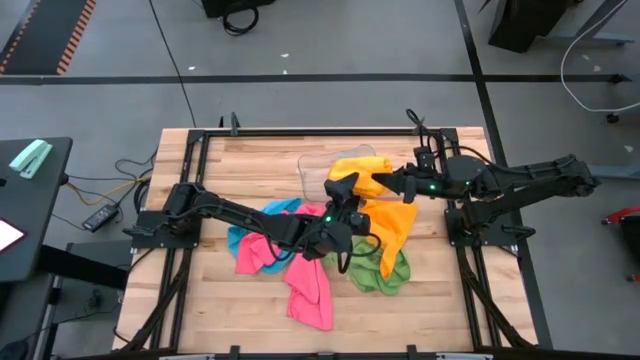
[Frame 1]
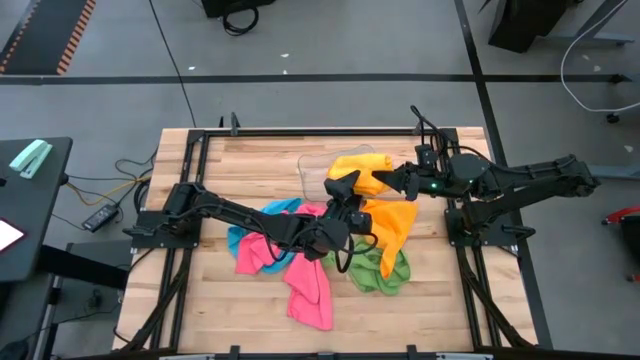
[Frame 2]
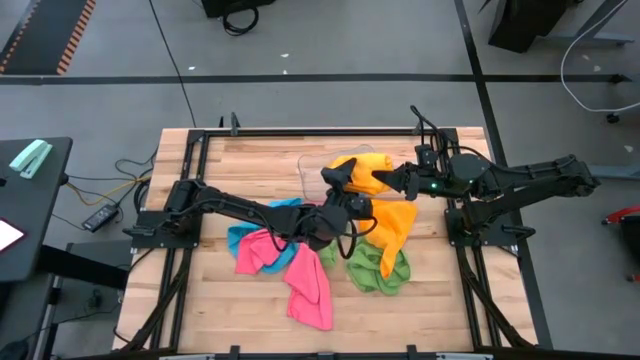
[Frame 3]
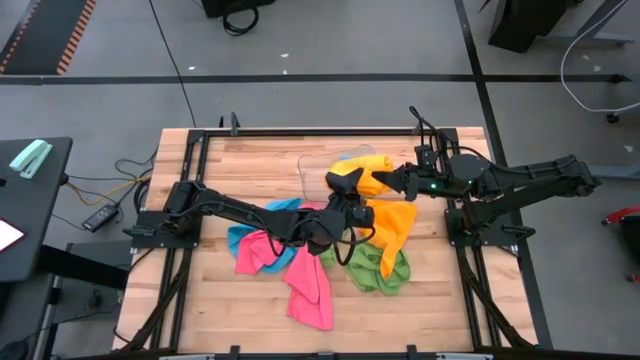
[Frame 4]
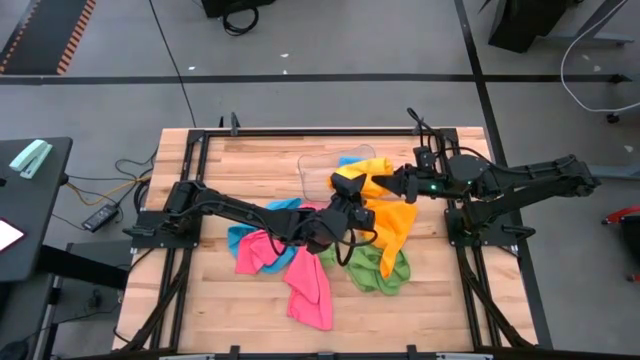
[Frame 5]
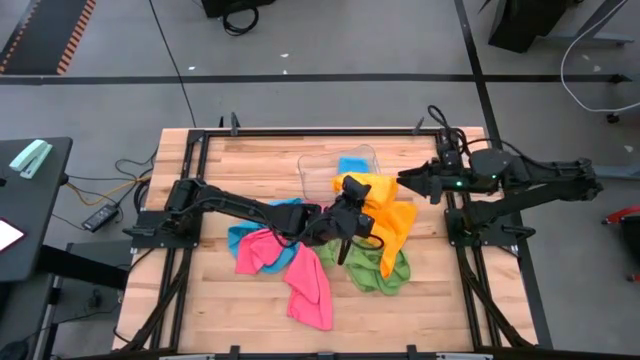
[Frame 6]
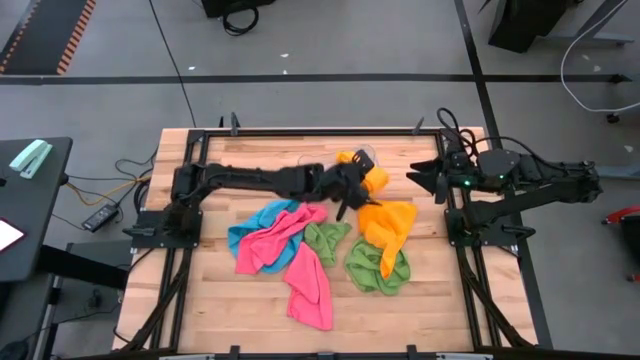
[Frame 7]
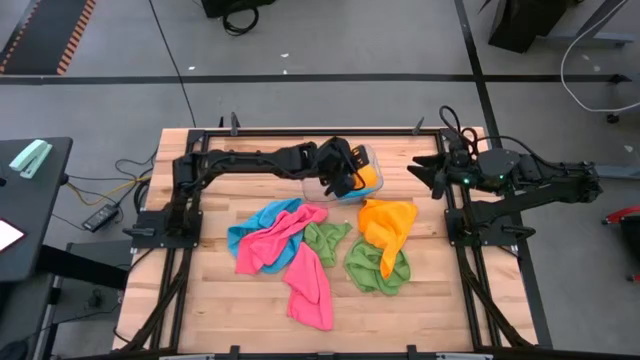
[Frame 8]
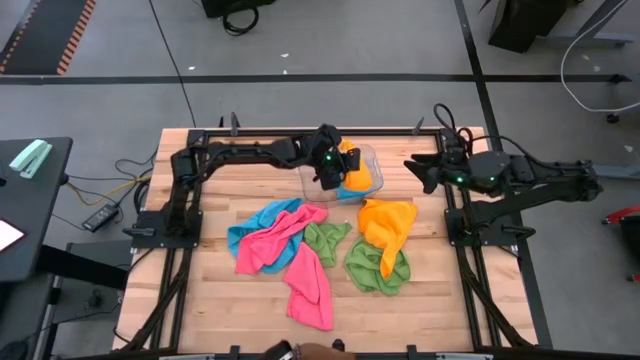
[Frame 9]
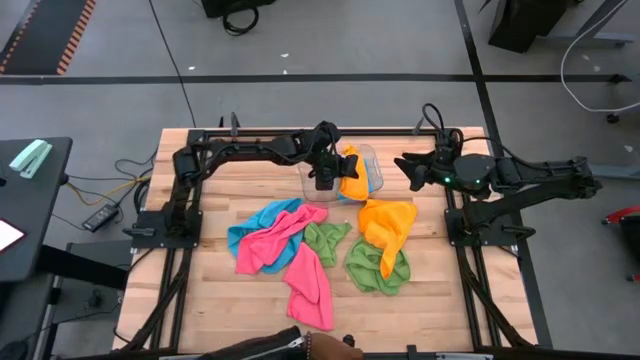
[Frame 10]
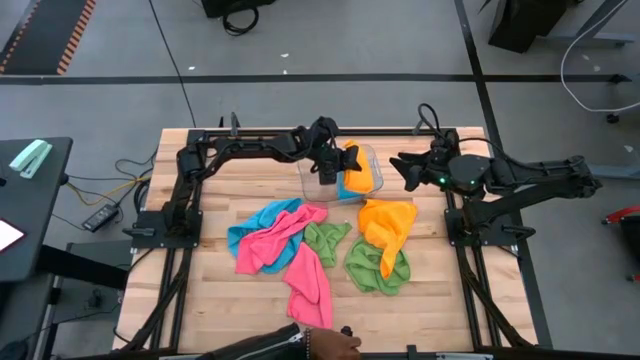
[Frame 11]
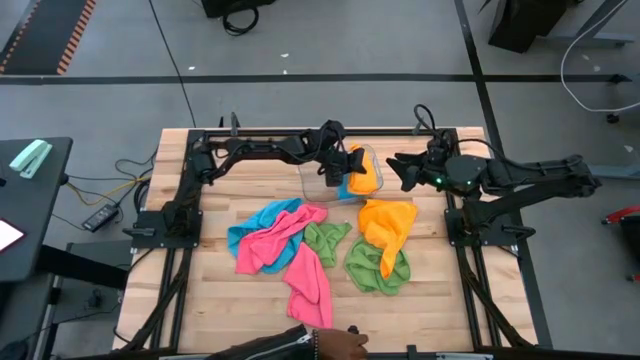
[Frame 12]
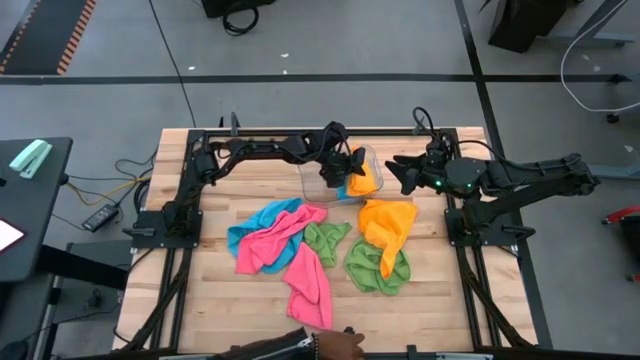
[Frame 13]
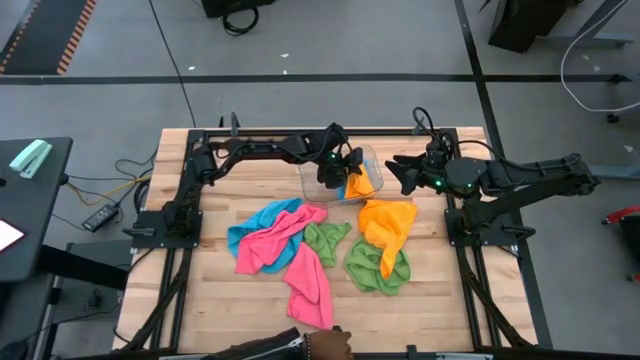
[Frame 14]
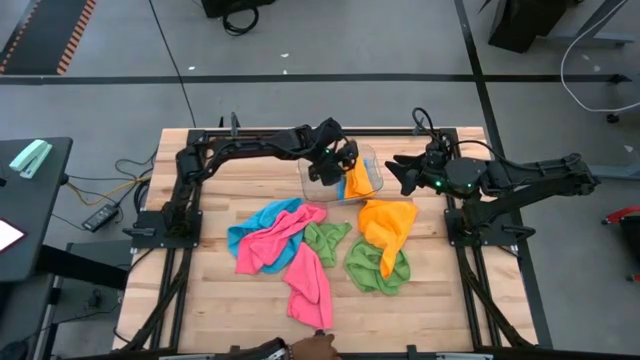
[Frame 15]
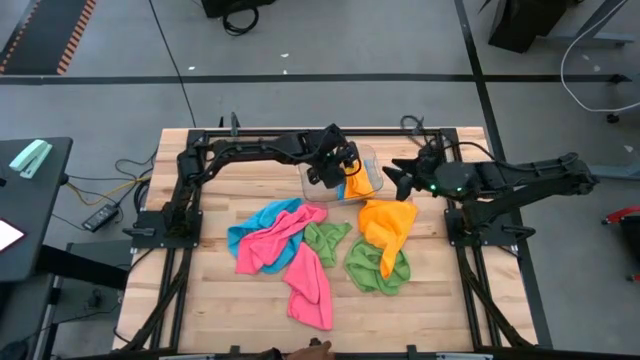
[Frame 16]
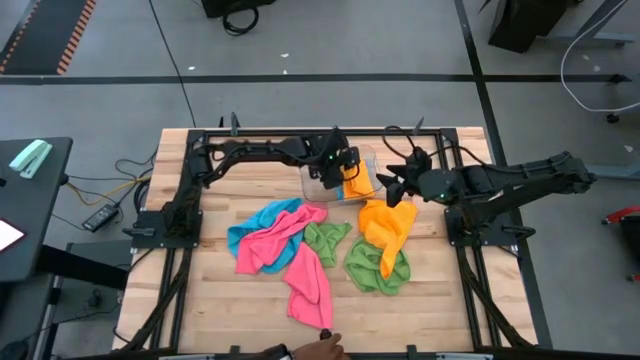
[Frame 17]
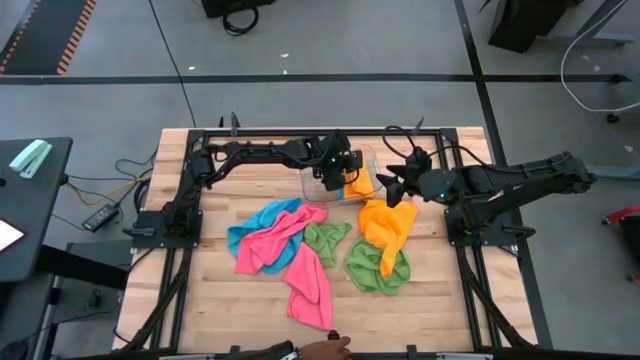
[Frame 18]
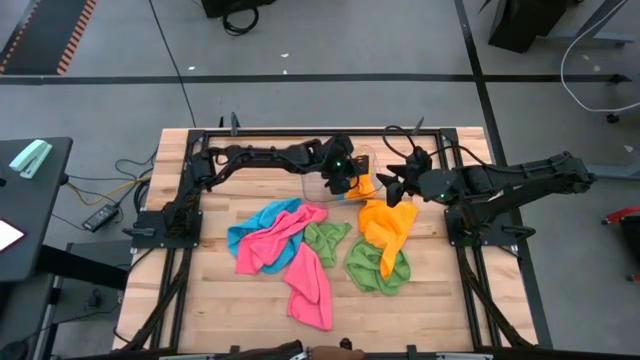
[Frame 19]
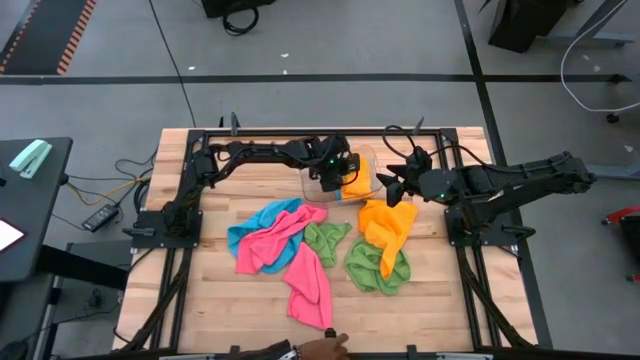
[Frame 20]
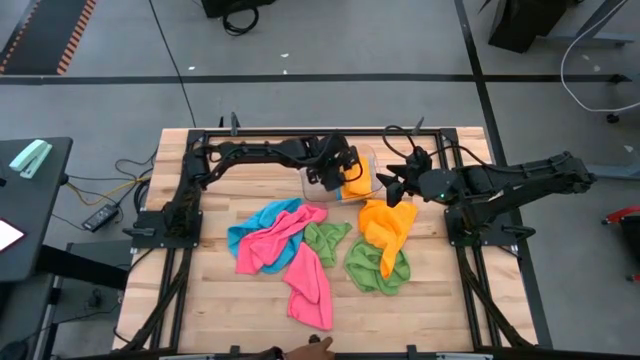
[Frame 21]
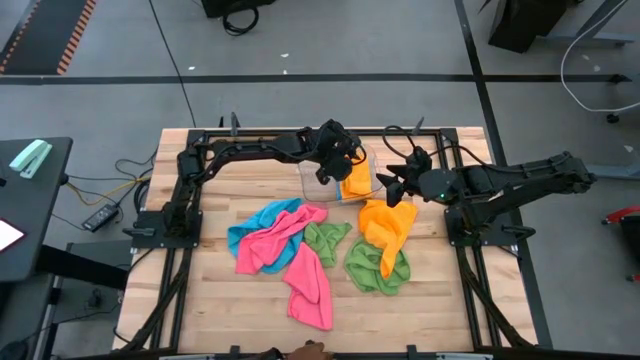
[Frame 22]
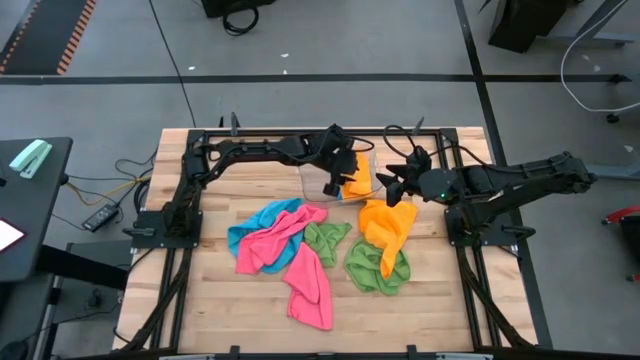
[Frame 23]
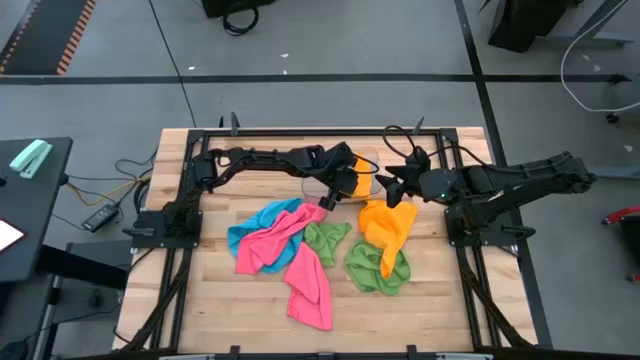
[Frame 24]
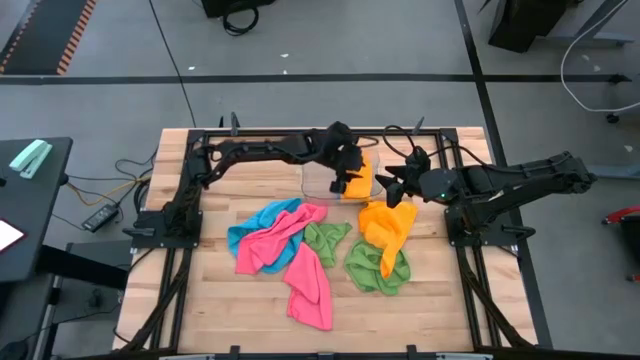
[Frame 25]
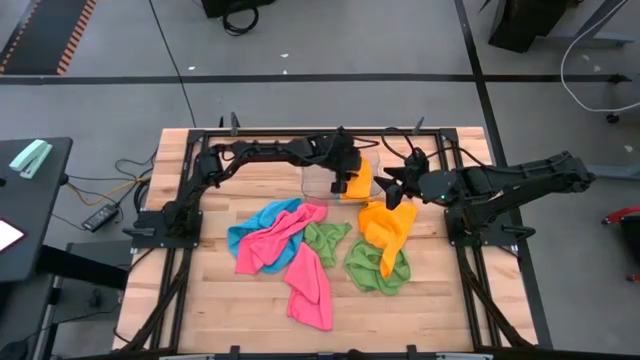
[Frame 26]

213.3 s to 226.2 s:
Task: Fold microfiber towels
Put the folded yellow microfiber cloth on the transparent bin

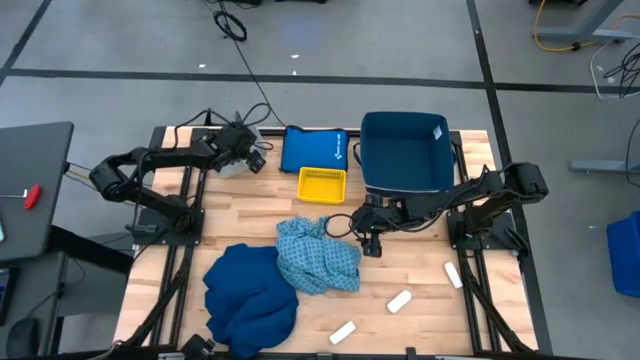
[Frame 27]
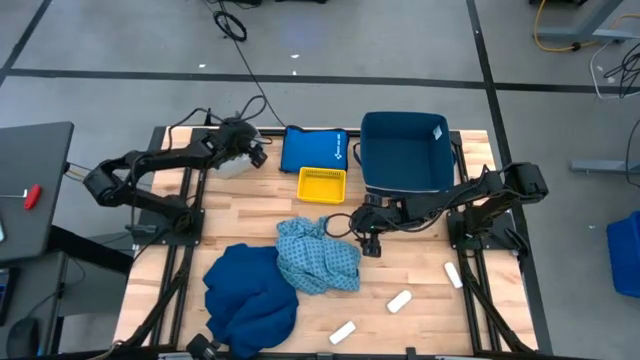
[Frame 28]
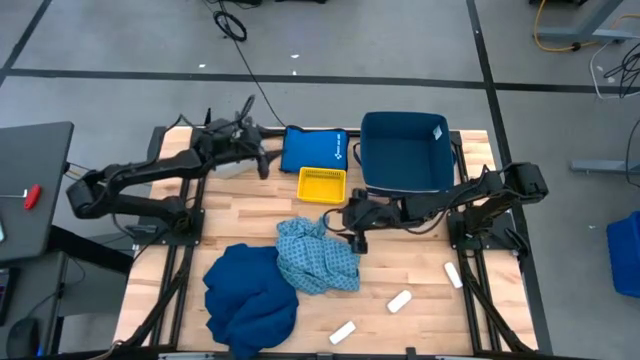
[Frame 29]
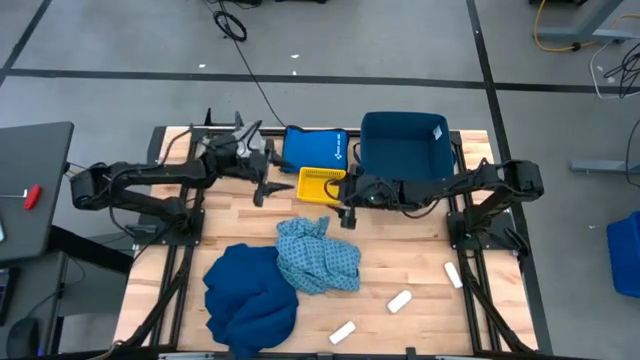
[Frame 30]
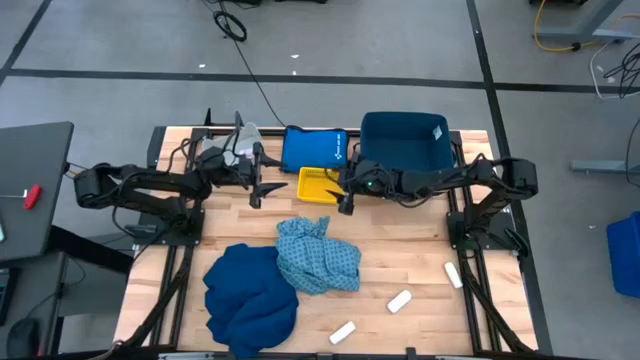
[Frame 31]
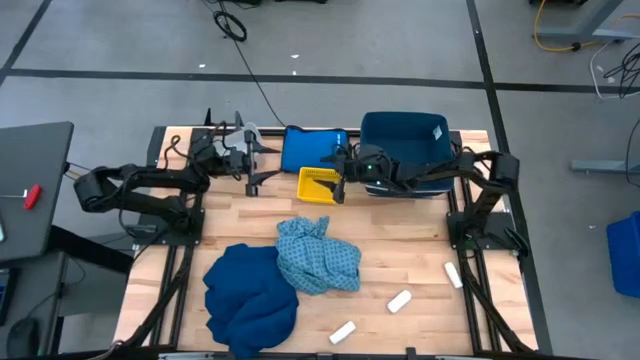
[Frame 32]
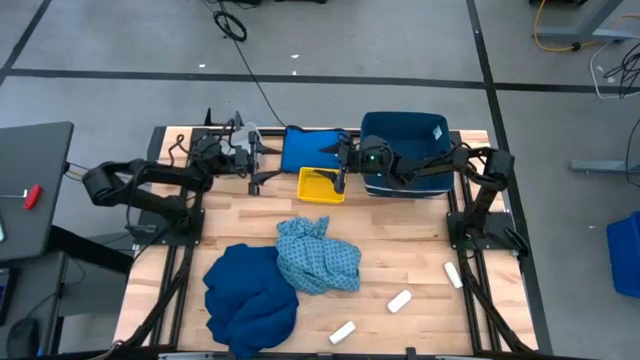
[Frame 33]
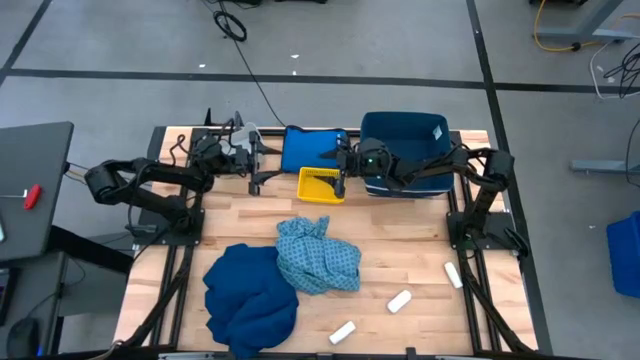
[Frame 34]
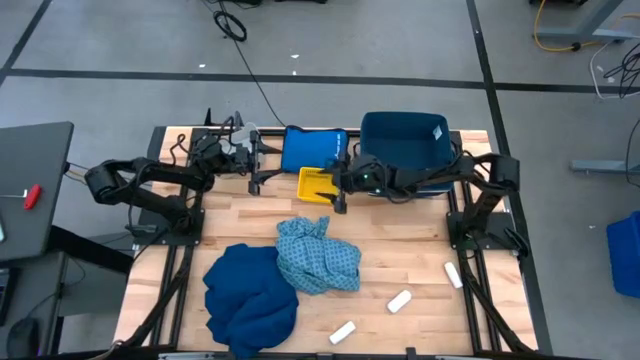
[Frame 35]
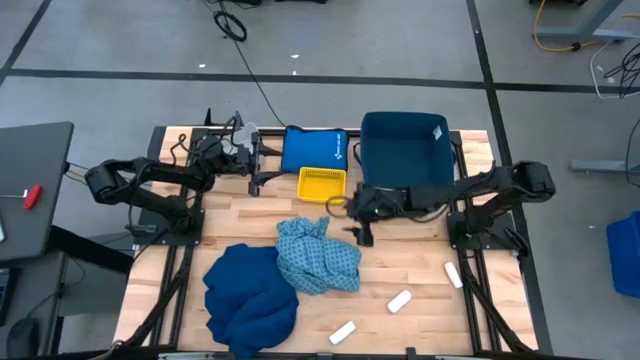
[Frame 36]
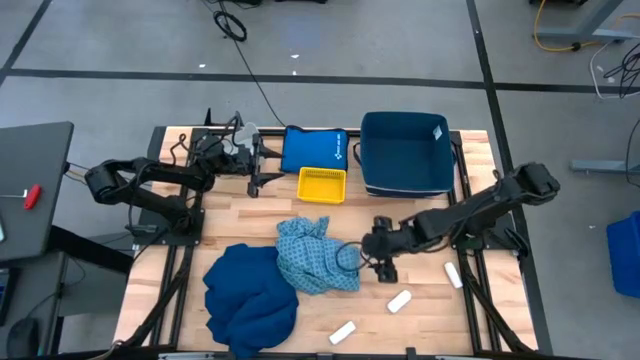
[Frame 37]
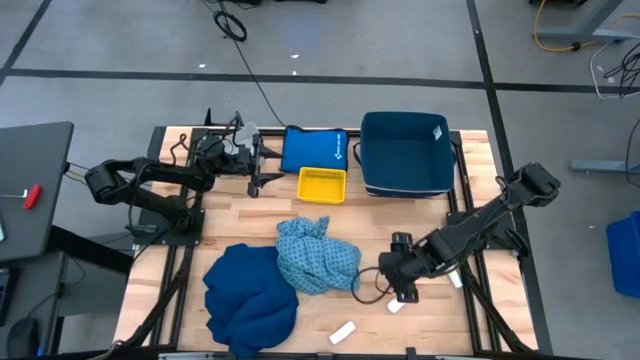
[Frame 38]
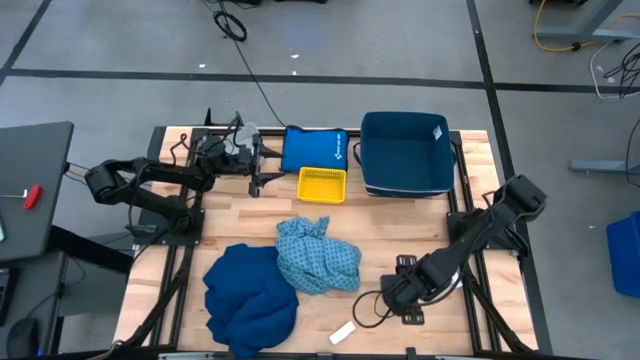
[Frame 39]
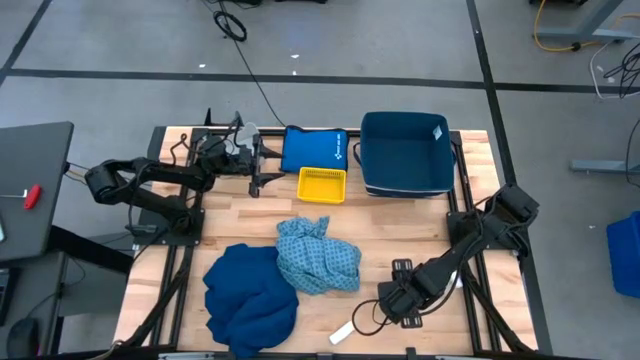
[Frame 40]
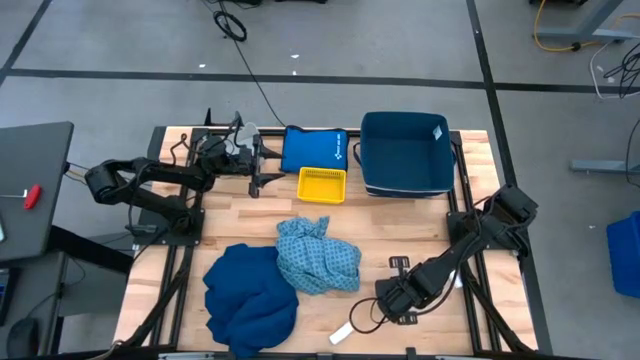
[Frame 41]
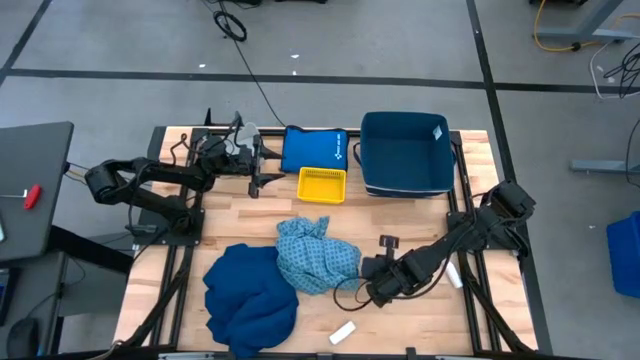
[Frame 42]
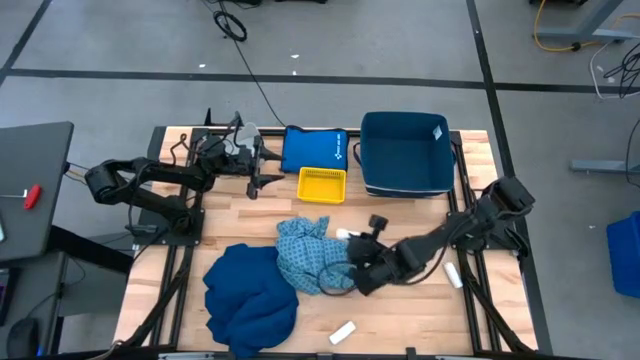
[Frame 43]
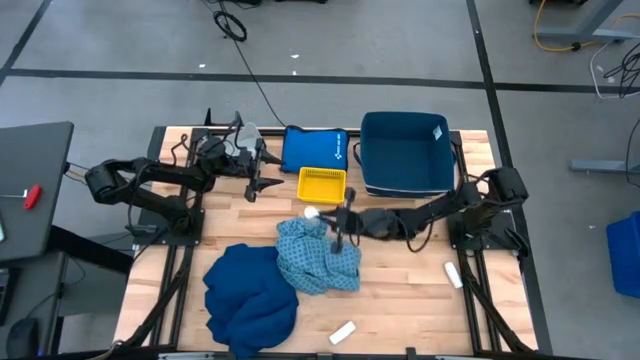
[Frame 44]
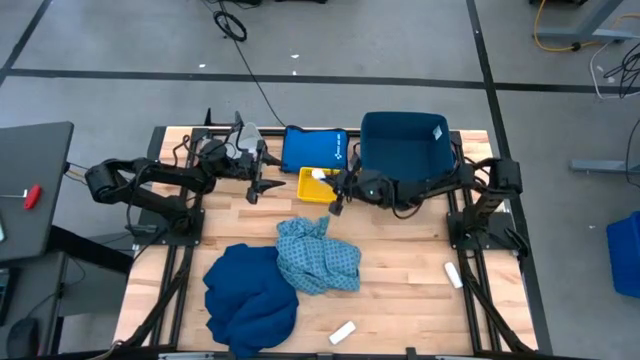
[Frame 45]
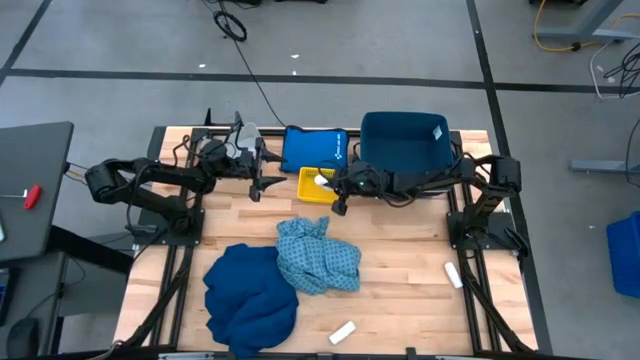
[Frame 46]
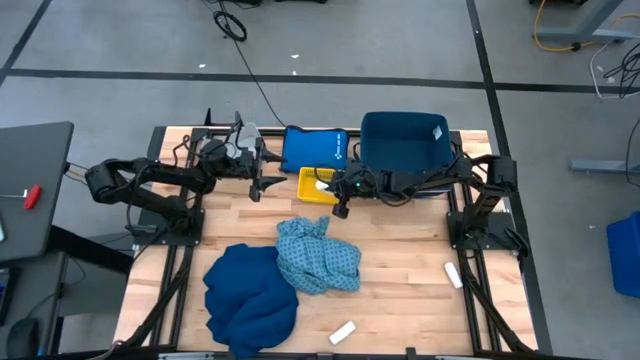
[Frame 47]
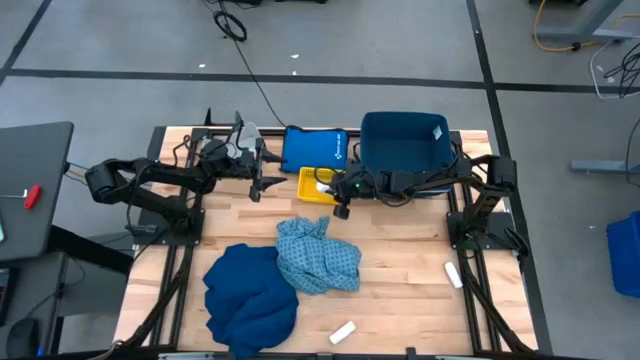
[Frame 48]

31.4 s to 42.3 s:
Task: Pick & place medical supplies in basket/bin
Put the middle white rolled gauze into the yellow bin
